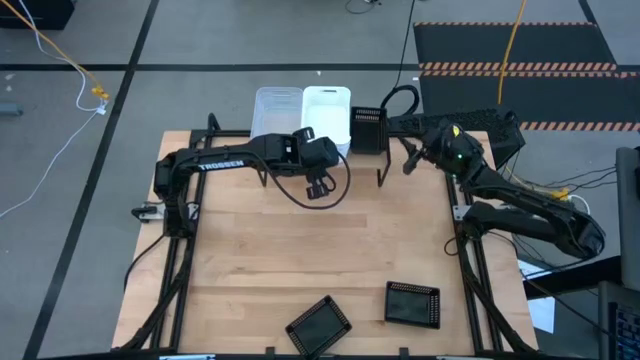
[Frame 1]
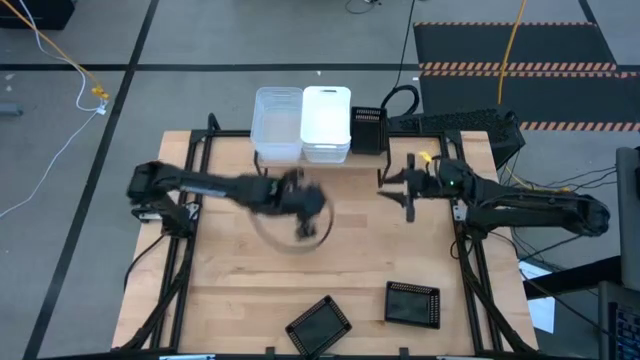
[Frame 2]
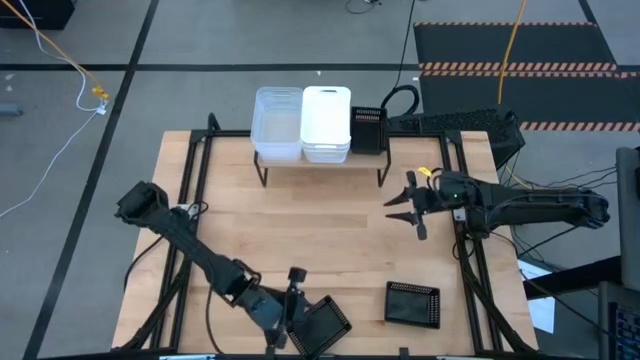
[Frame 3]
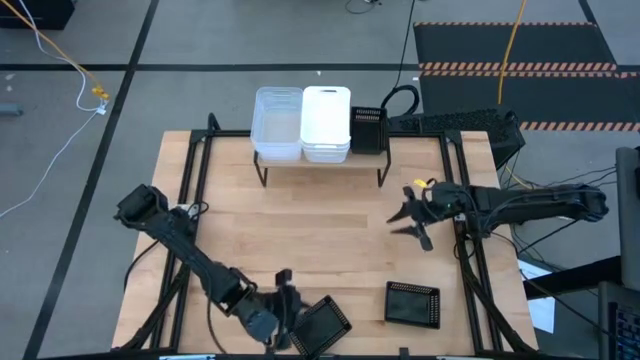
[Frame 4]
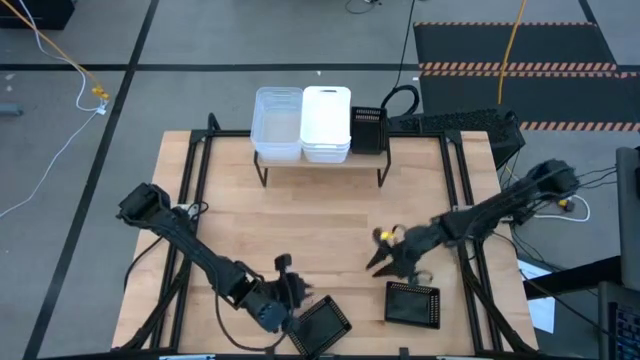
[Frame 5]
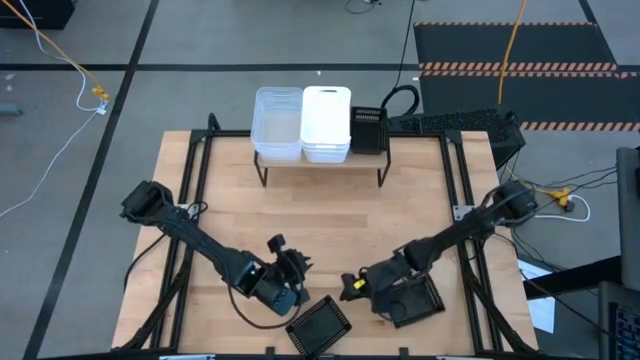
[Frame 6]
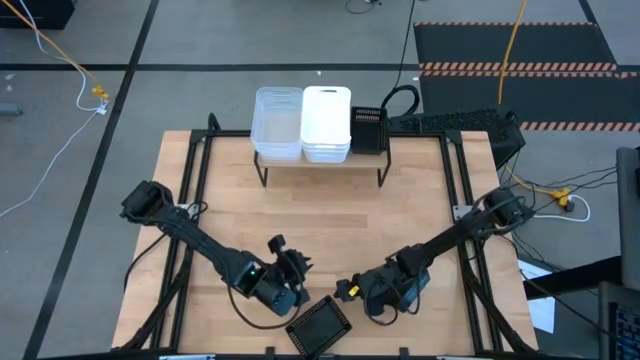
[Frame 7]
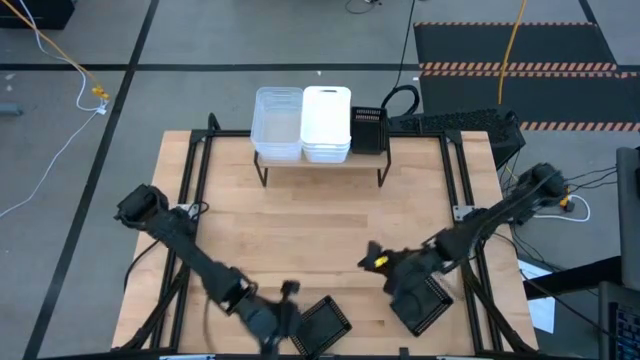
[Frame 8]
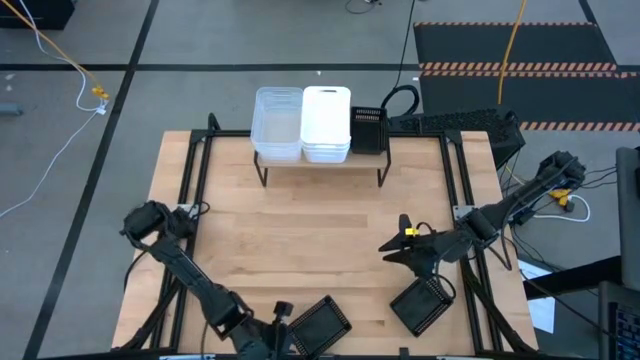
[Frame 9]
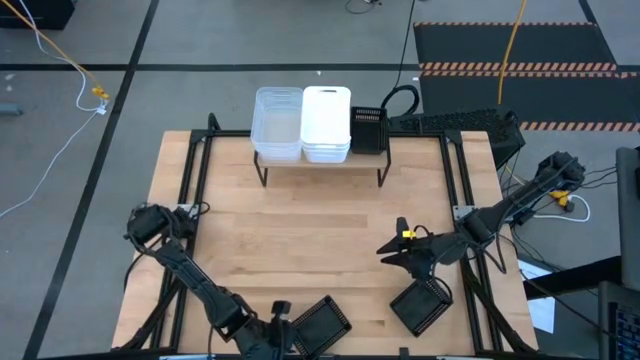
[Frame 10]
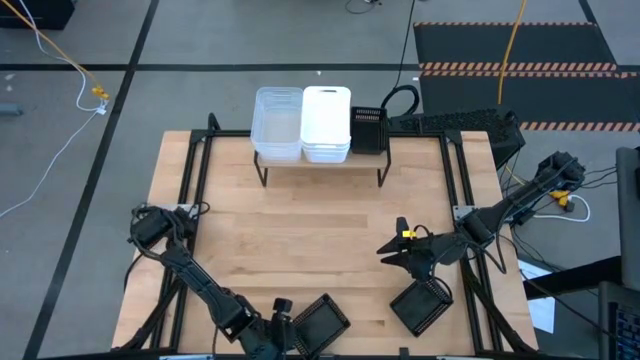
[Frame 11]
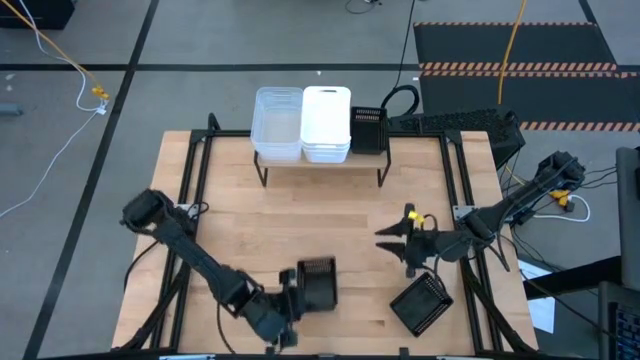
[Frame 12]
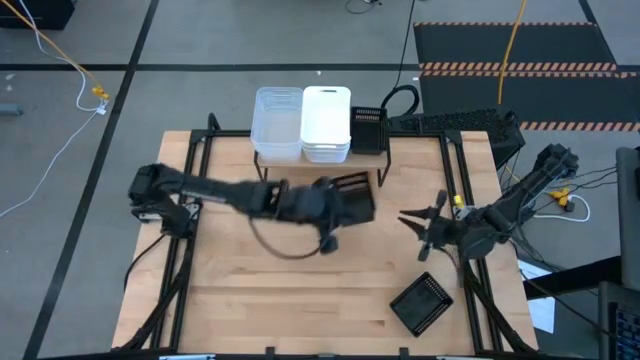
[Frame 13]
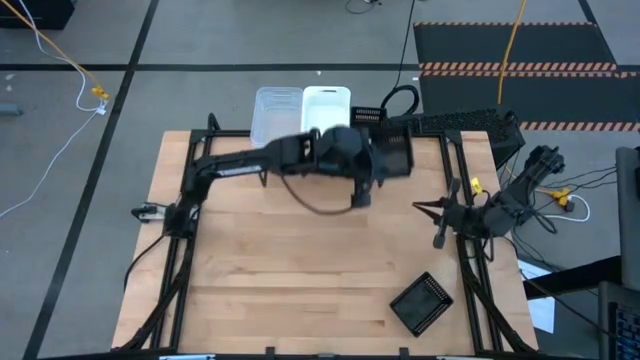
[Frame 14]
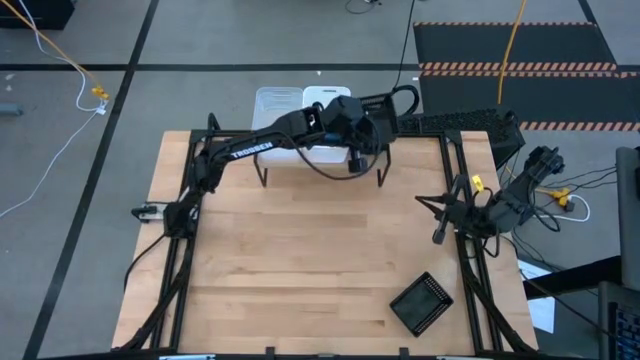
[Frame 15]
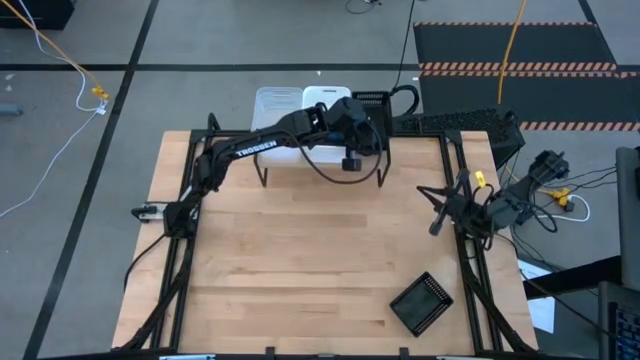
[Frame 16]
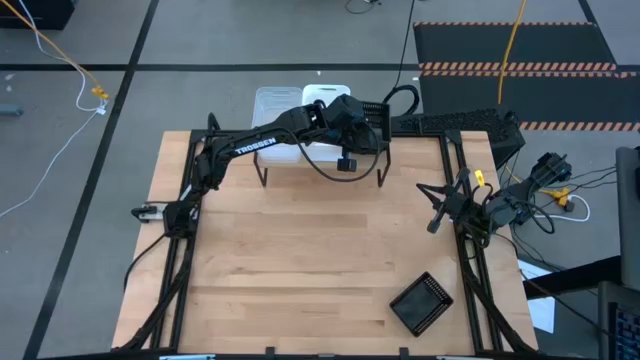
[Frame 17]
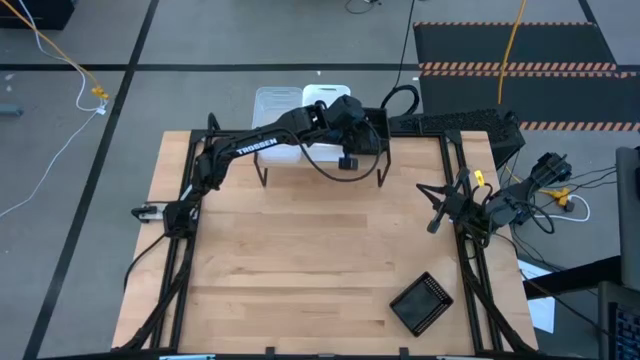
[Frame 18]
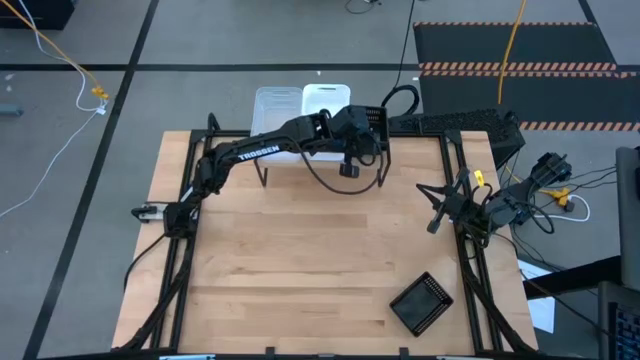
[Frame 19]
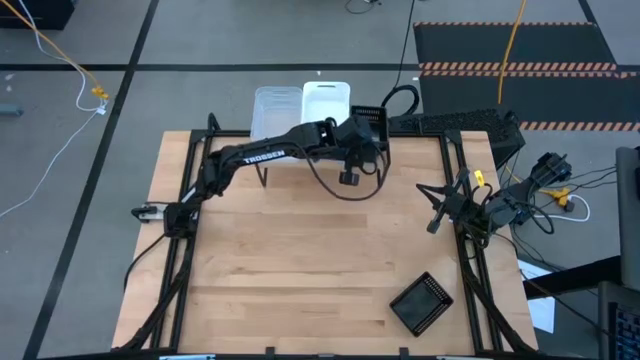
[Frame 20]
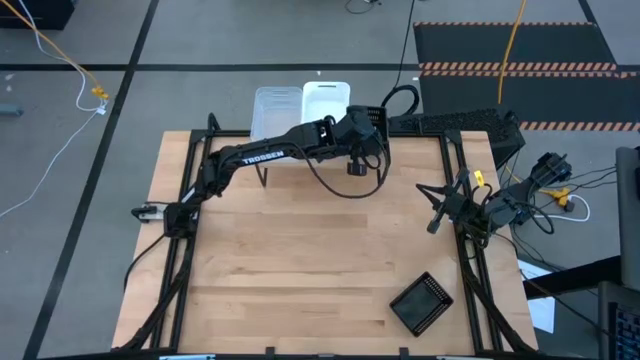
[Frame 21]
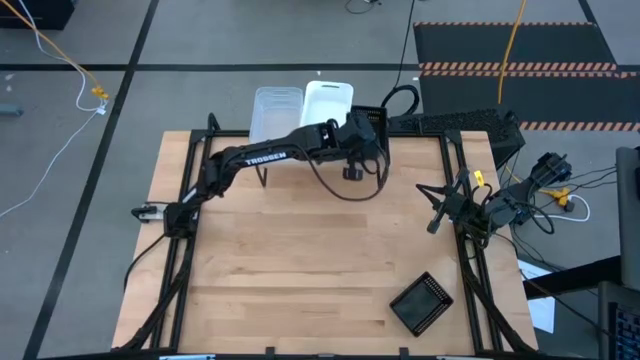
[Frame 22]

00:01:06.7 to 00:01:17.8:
Task: Stack baskets on shelf by color
Stack the left black bin on the black bin on the shelf

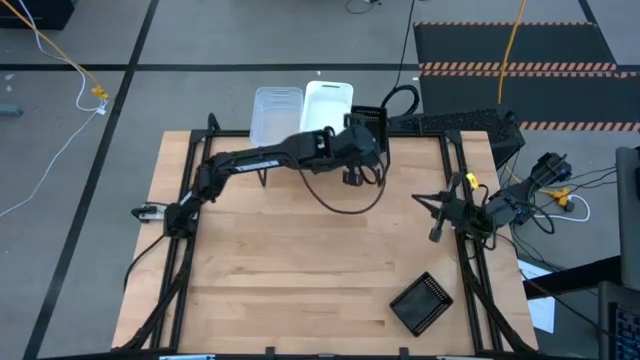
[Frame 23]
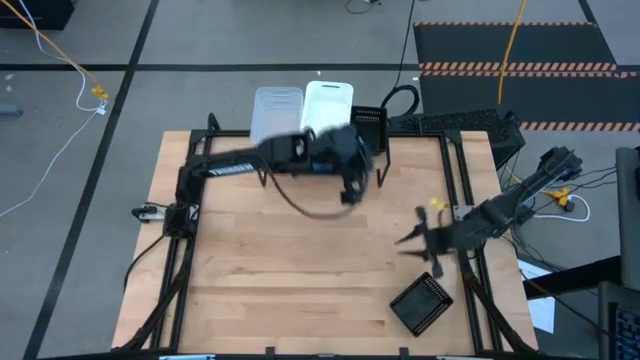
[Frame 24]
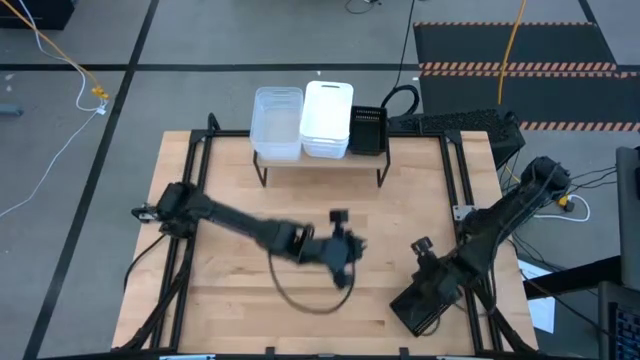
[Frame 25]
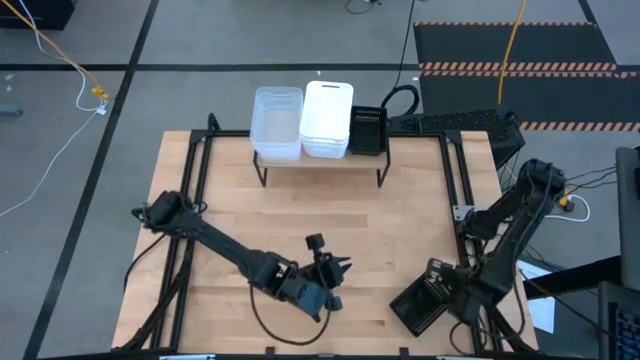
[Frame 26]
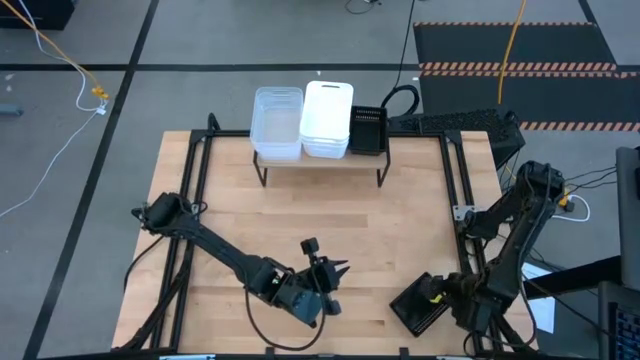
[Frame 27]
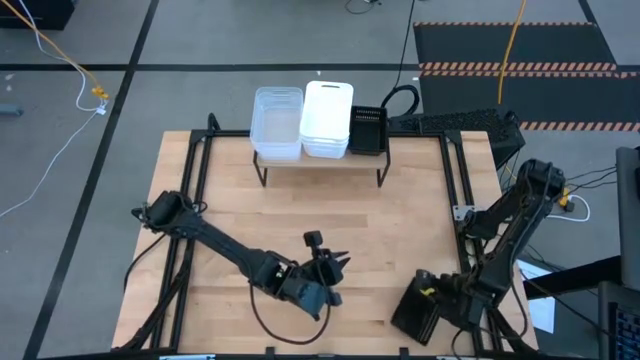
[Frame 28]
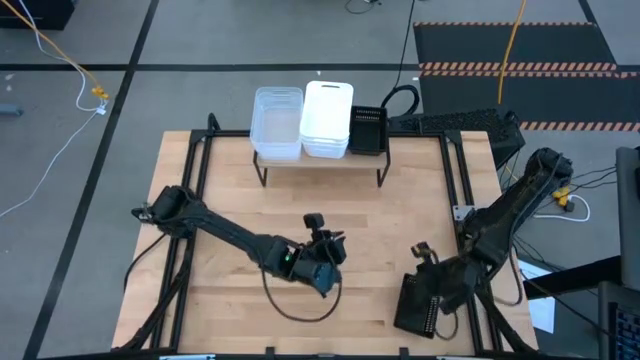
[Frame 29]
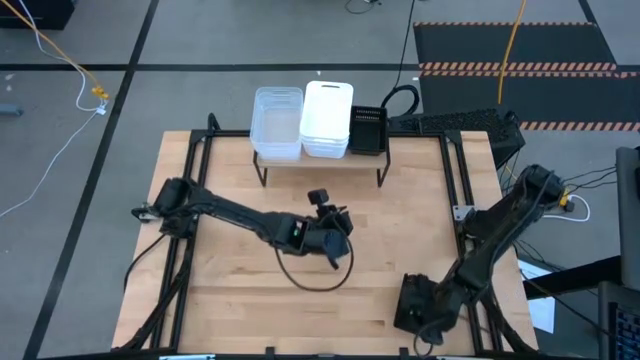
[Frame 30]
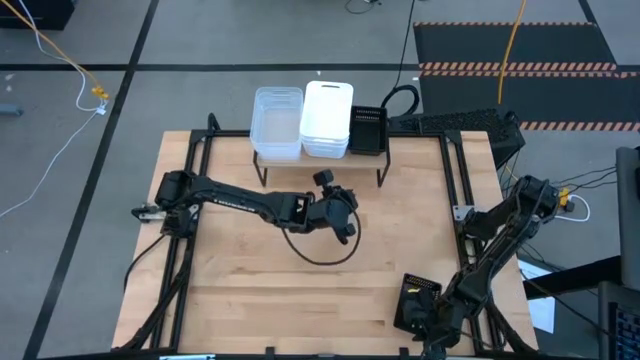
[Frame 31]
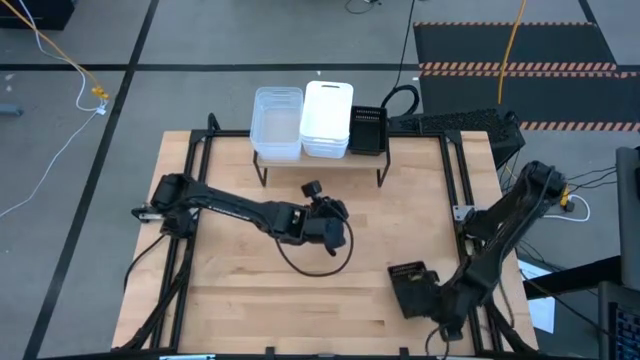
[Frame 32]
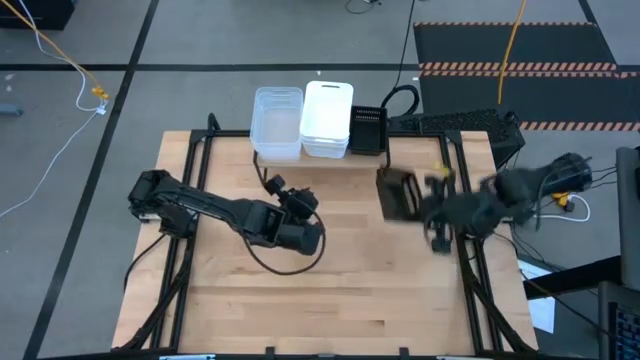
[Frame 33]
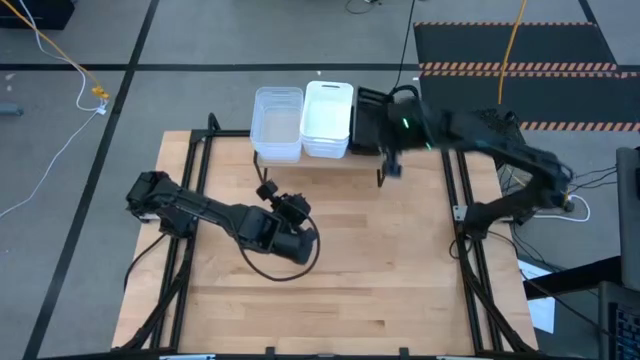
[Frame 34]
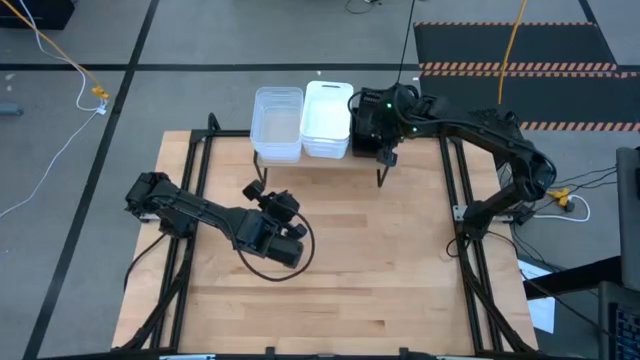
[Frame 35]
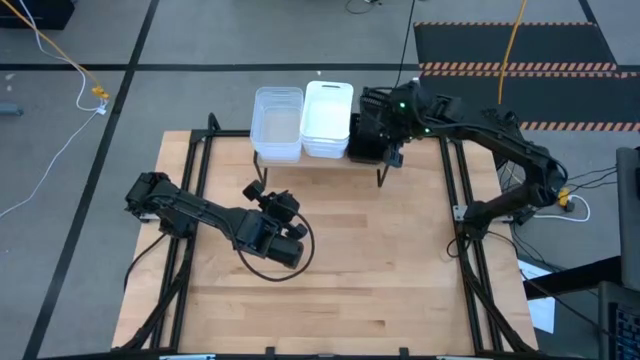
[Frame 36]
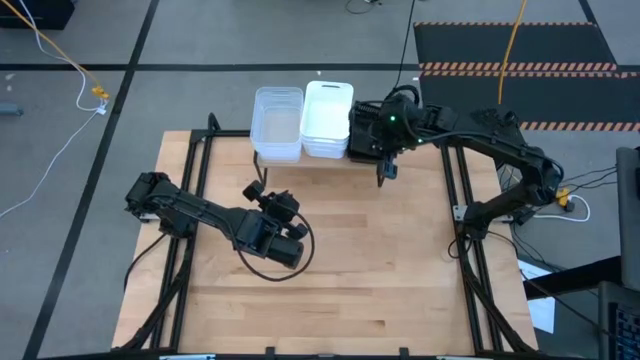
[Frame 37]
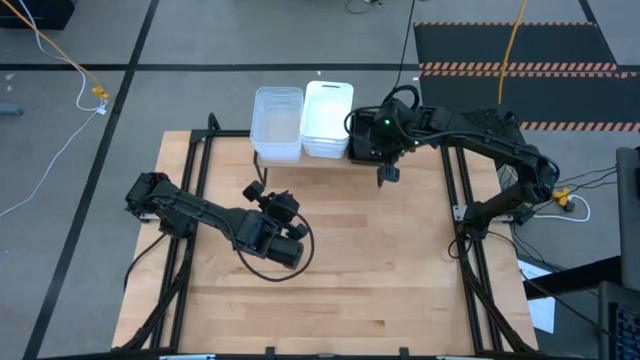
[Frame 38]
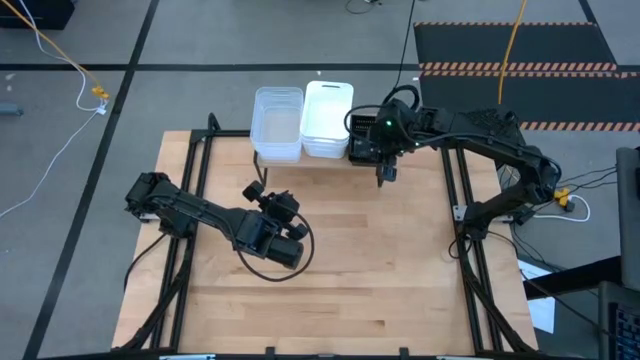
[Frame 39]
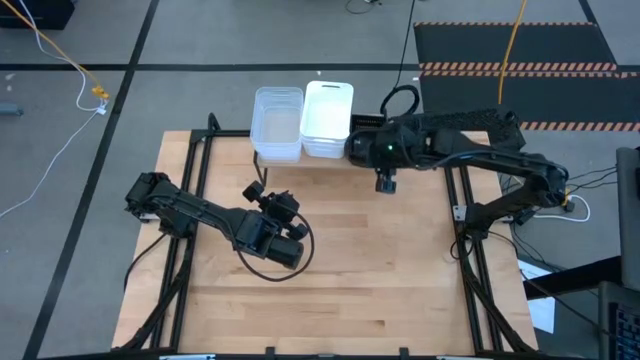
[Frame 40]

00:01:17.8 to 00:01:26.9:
Stack the black bin on the black bins on the shelf

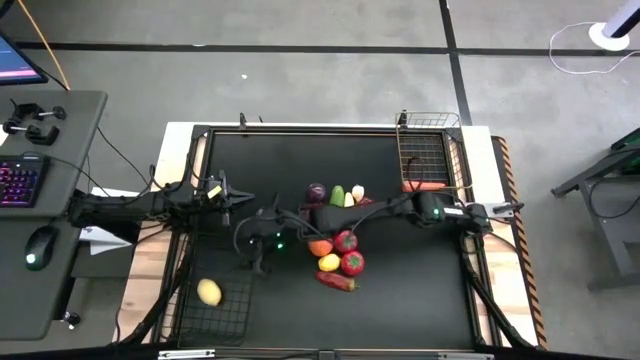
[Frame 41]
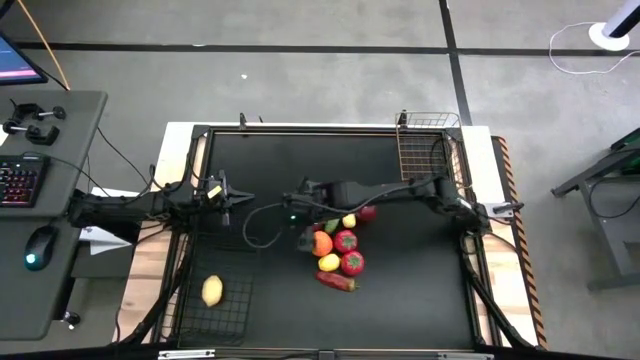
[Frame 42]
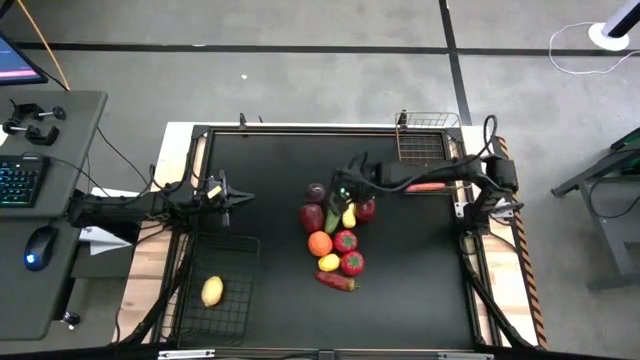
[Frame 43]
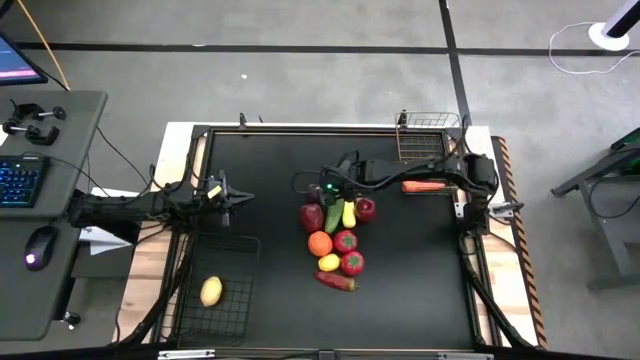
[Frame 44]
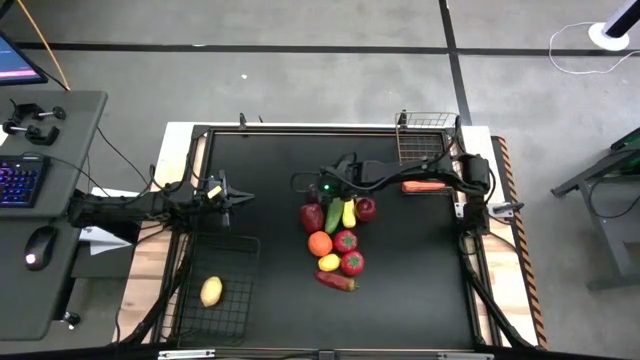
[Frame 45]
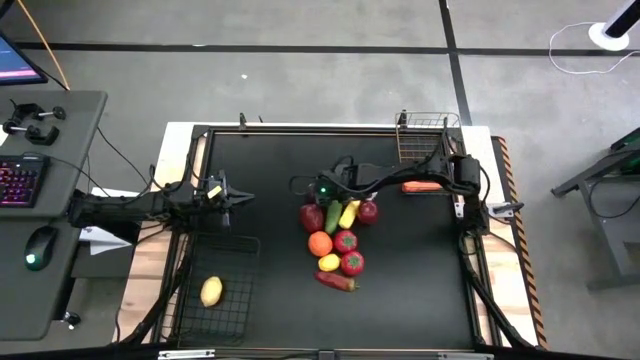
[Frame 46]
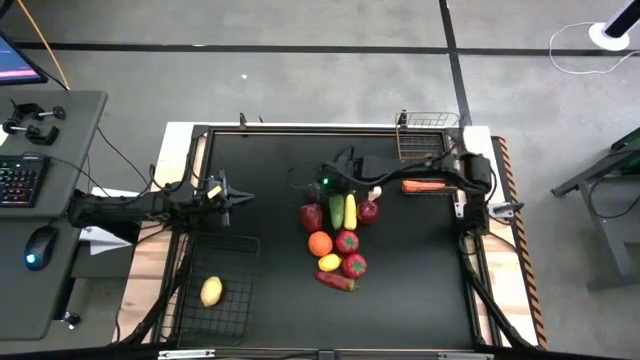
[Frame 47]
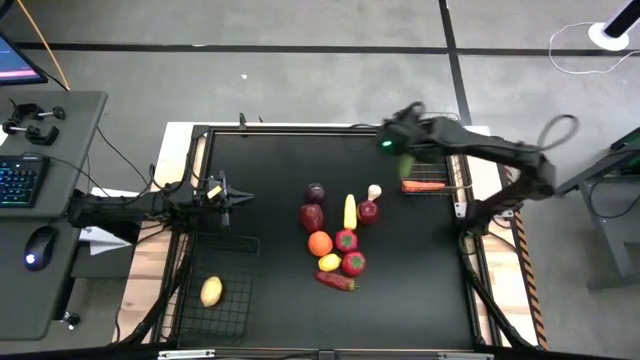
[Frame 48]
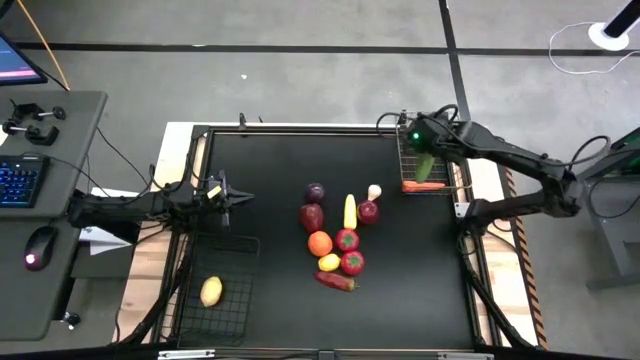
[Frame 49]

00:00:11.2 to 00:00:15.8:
Task: Sort produce into baskets
Put the cucumber into the right wire basket
